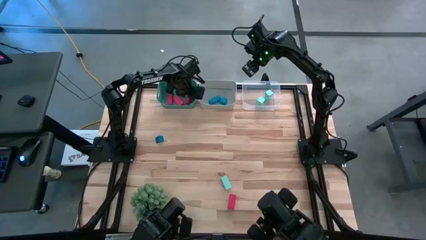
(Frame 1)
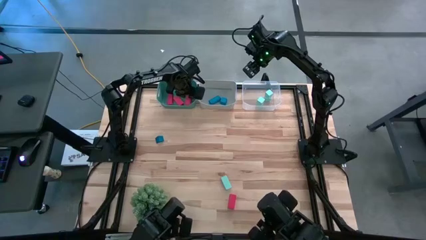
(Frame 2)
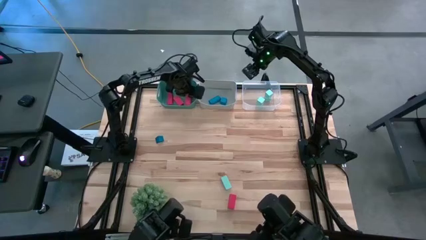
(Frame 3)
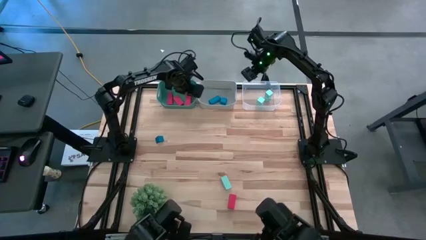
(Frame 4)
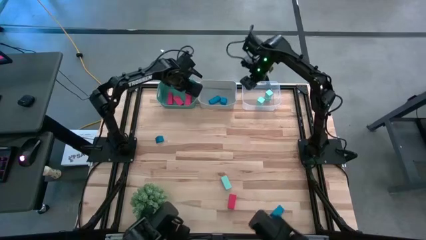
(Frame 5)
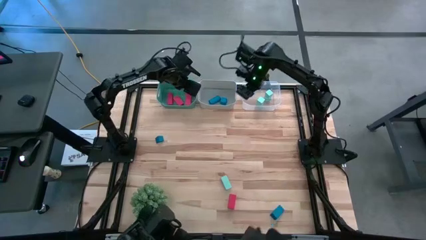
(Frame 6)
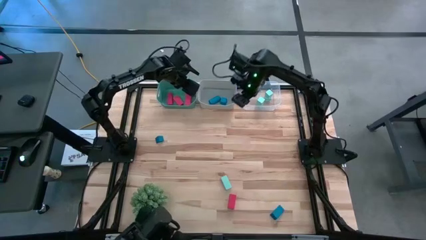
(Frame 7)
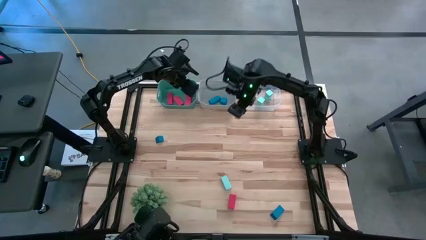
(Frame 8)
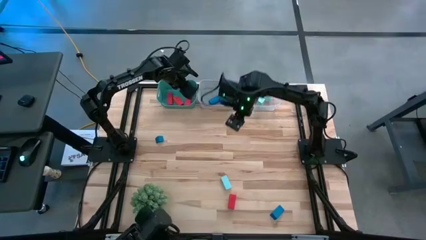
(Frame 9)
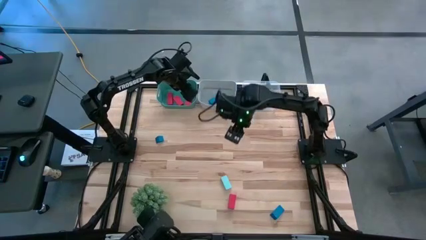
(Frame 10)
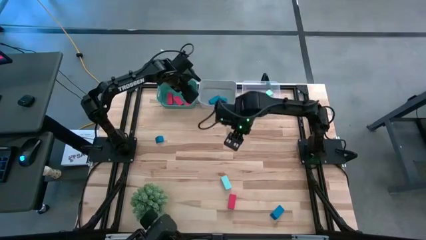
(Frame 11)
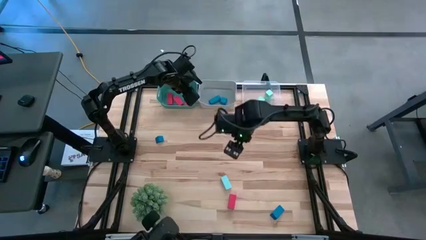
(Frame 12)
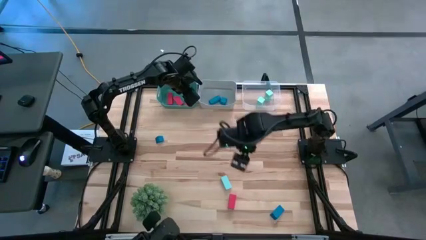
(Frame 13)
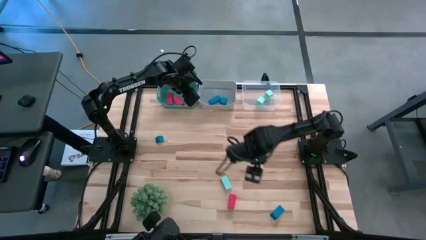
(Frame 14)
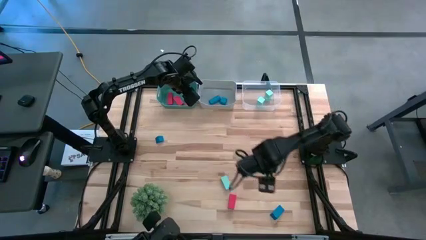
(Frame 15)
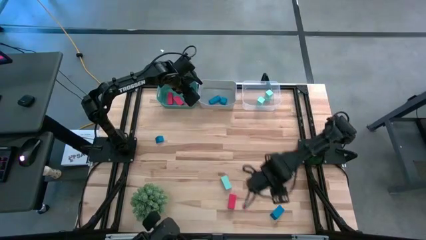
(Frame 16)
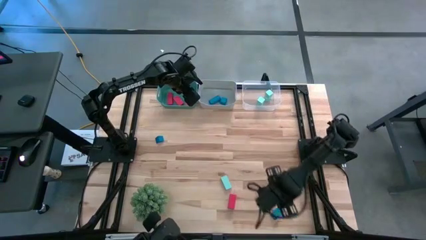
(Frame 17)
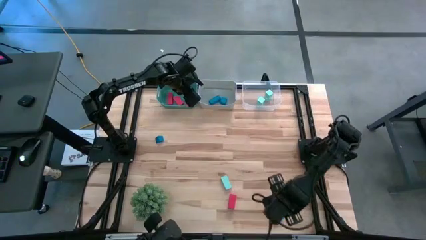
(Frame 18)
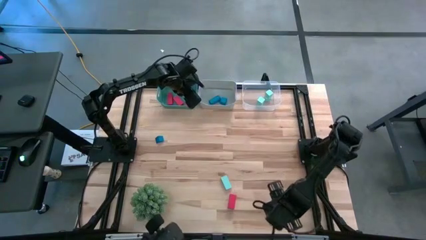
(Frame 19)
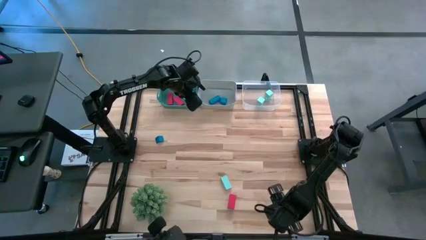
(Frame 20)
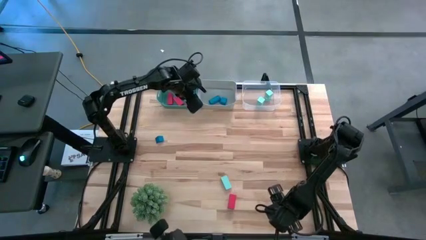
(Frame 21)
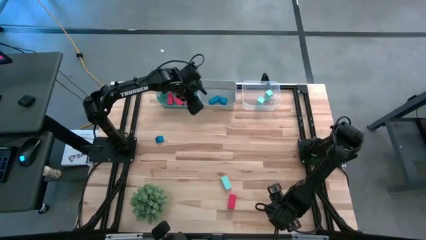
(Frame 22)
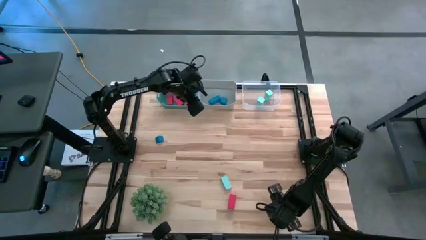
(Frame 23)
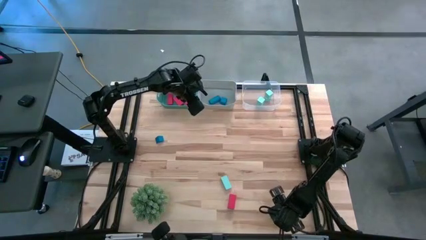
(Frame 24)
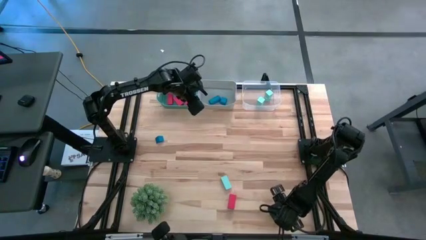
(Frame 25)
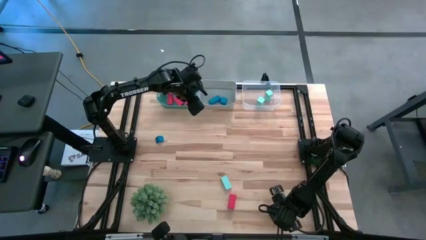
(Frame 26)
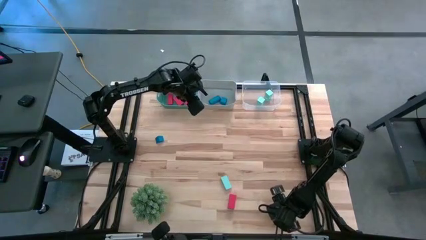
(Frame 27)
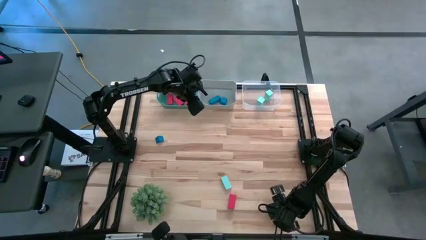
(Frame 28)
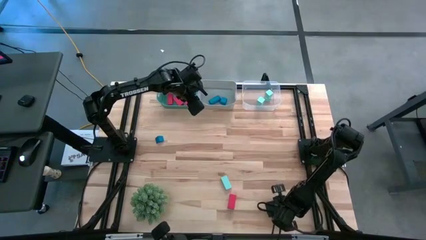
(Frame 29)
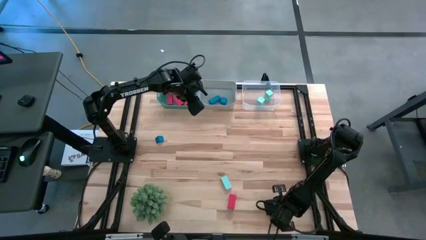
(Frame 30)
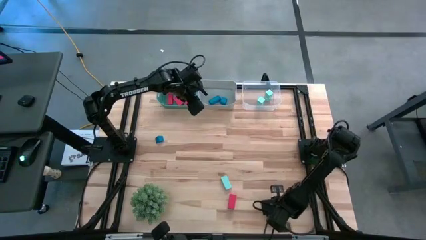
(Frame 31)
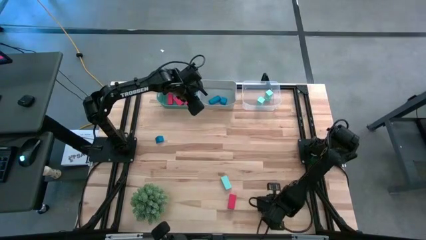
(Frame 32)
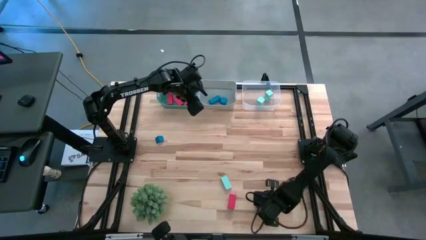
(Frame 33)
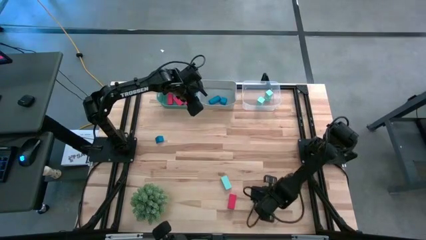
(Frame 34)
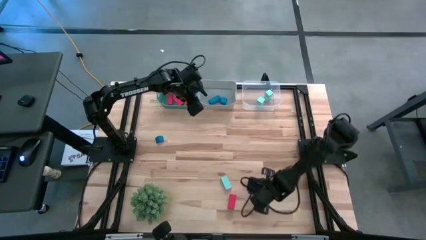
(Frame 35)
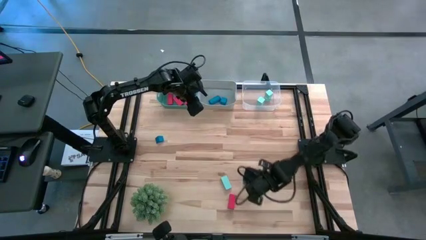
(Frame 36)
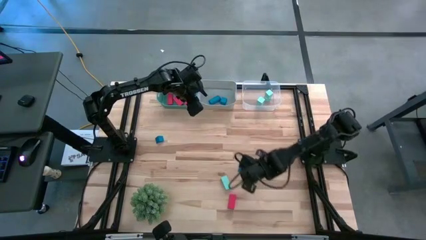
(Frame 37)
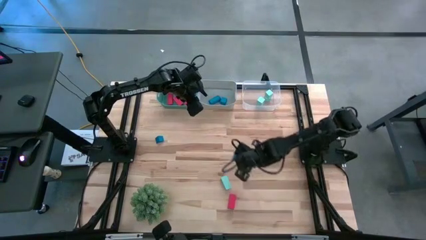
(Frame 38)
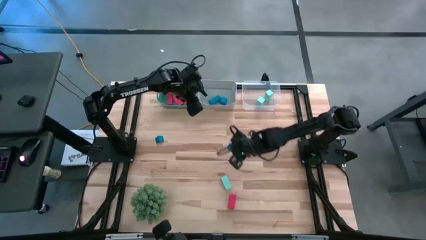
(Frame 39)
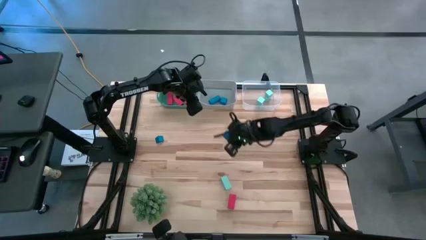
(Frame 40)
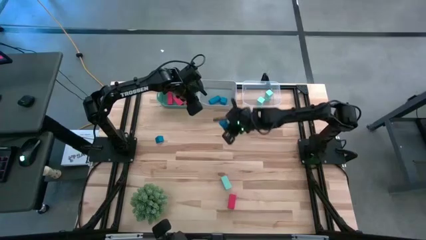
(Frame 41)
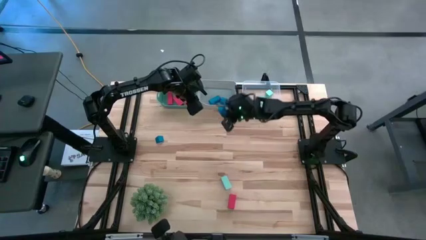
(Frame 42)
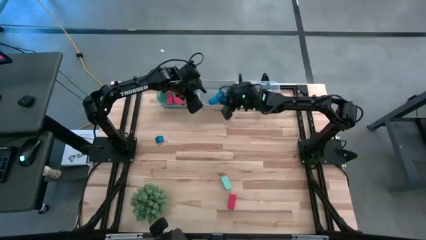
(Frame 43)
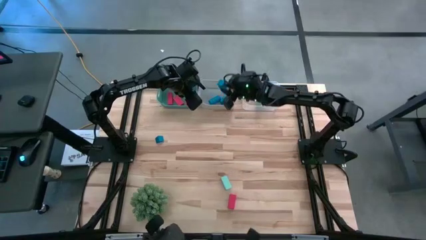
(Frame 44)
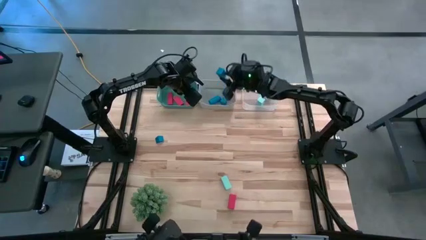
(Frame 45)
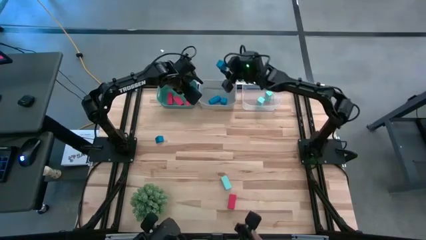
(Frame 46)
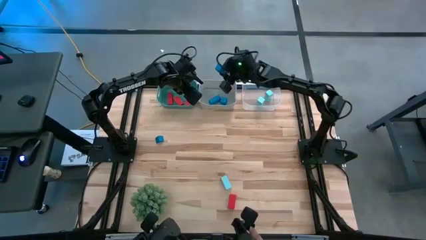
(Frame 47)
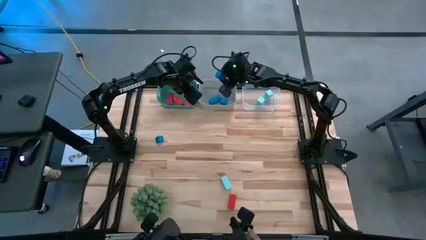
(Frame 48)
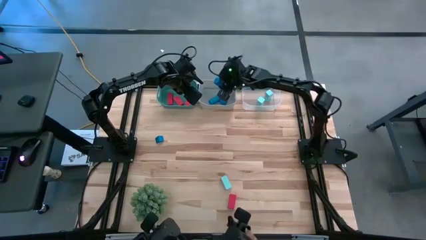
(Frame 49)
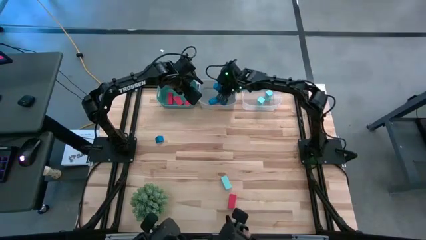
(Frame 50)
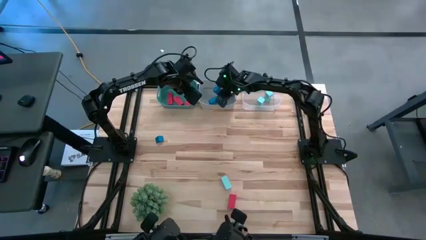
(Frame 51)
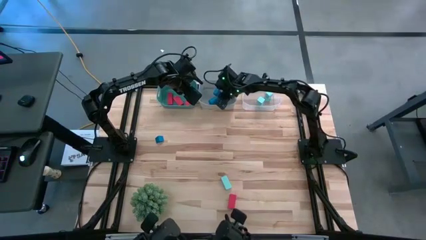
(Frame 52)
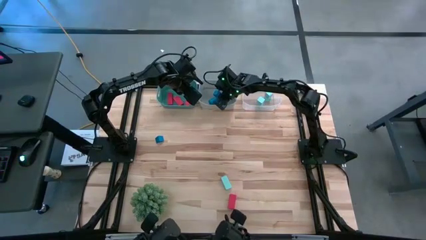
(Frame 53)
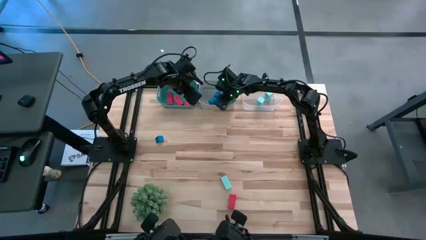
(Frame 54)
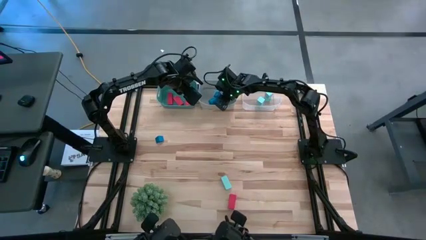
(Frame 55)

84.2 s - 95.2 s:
Task: Sort & place blocks by color
Put the blue block into the gray bin

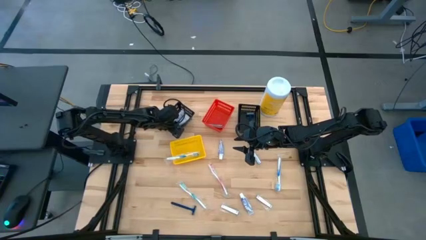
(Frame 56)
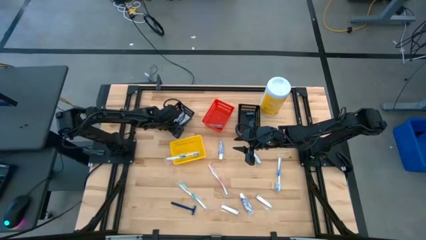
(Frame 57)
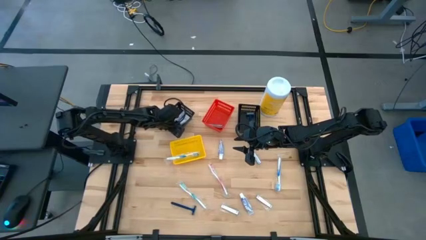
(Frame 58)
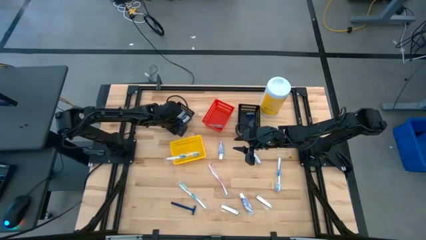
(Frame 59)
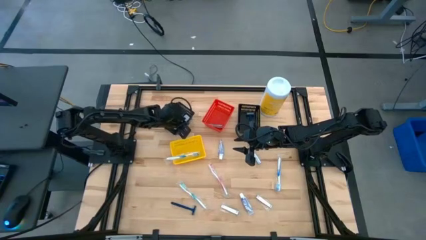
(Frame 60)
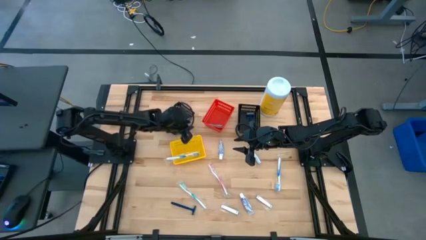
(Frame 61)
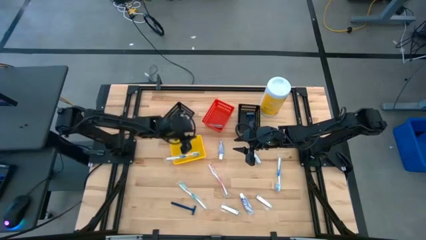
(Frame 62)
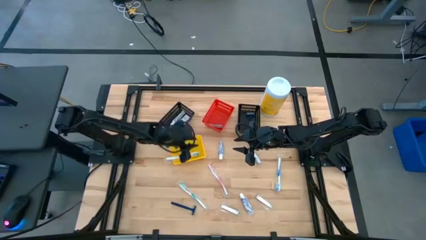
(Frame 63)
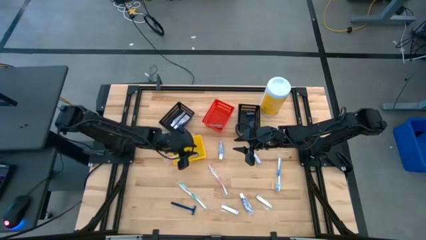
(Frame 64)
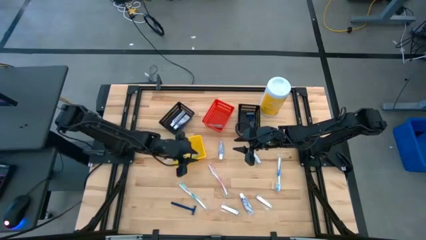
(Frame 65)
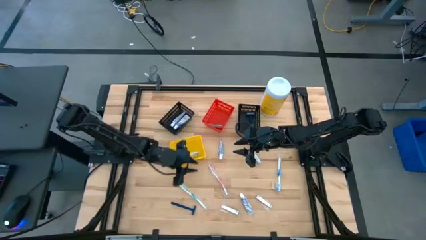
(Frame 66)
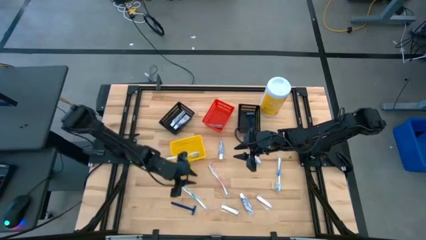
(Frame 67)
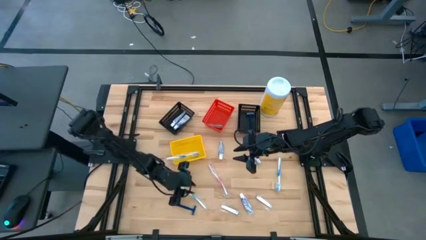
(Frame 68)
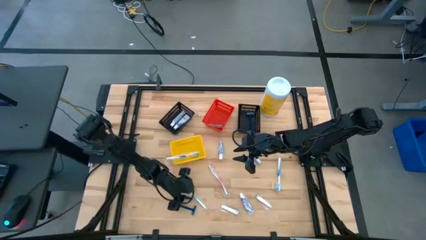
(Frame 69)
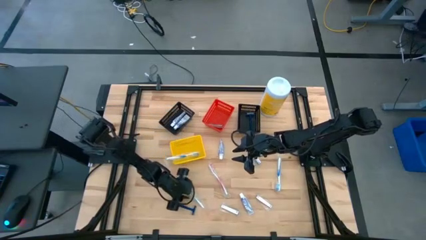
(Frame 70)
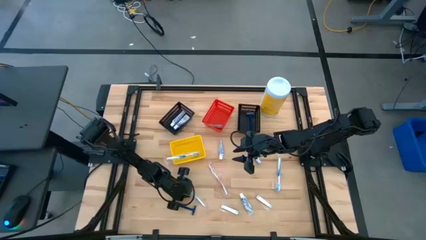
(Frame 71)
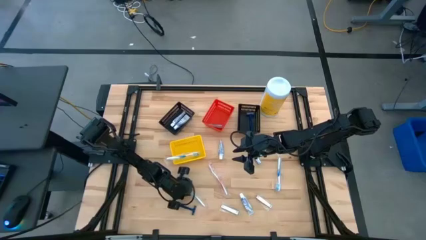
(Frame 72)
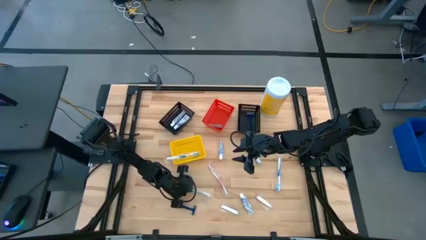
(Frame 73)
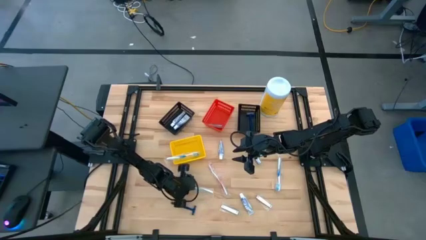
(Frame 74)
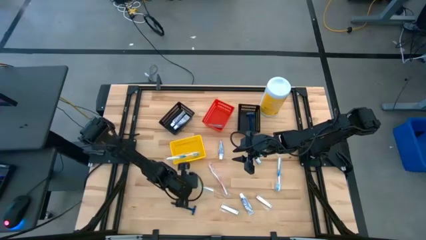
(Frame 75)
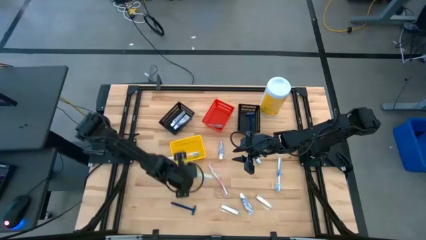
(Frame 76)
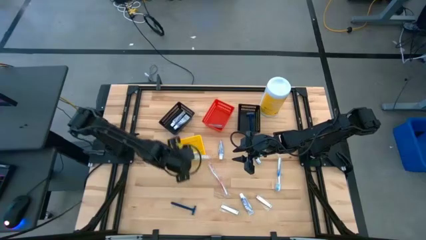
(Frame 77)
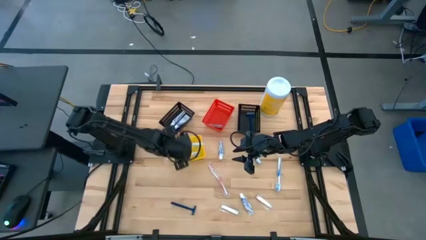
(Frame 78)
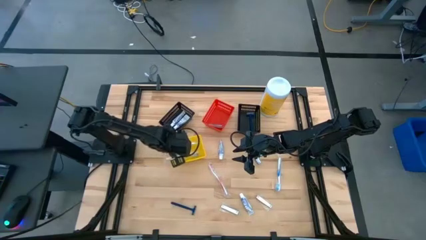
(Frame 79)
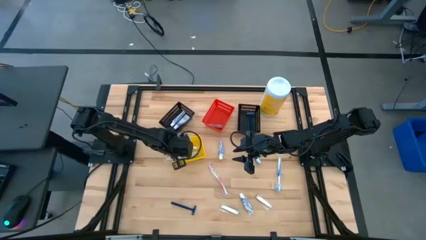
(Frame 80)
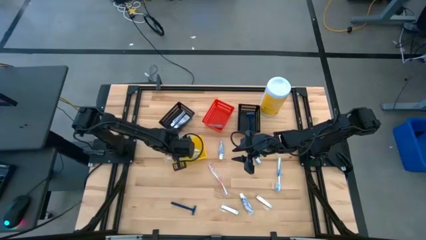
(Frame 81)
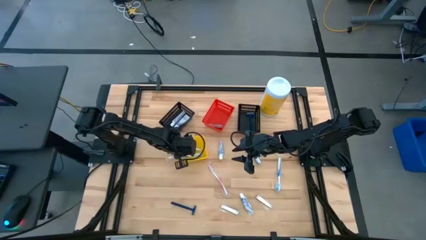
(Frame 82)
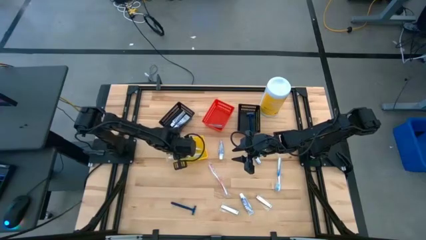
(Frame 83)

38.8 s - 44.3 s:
Task: Pick & Place Travel size toiletries
Put the green toothbrush into the yellow bin

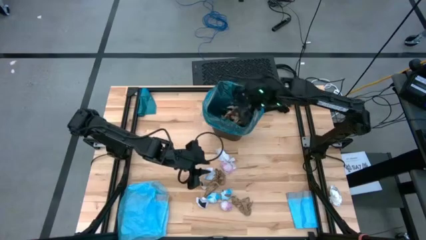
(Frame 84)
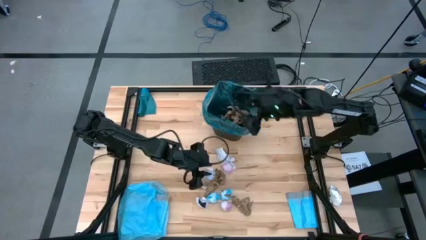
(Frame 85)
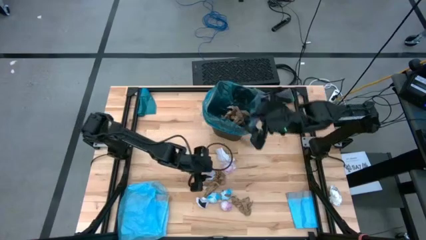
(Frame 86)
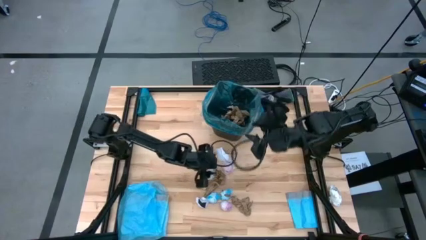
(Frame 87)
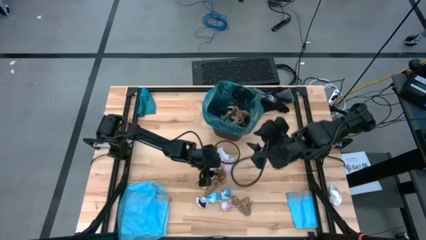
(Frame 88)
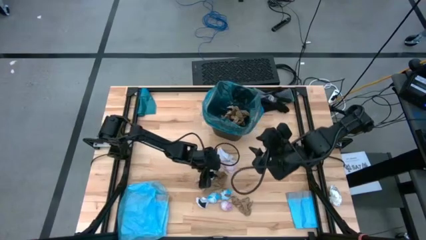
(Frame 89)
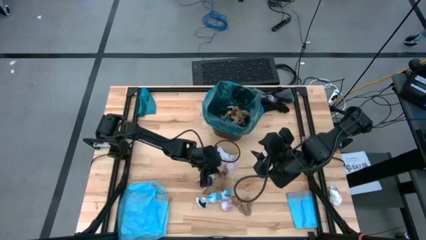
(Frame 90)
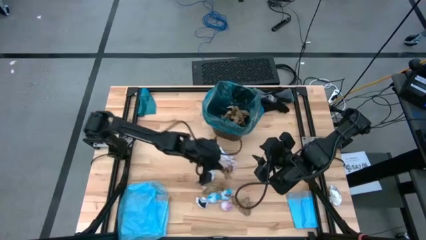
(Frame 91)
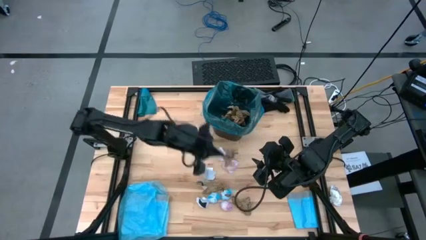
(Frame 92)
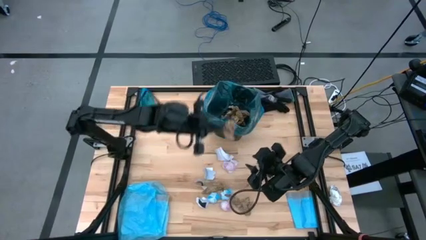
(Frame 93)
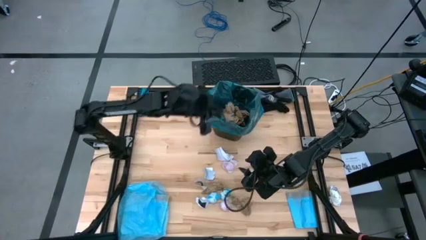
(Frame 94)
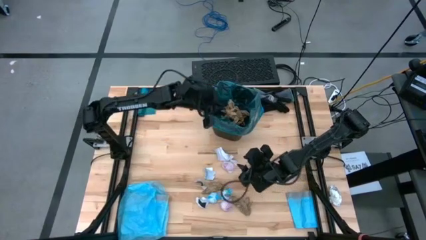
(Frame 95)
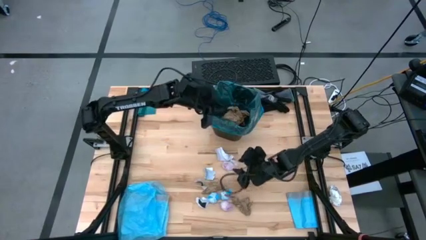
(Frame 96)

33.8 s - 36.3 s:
Task: place trash/remove bag and relplace
Put the brown napkin into the blue trash bag inside the black trash bin
